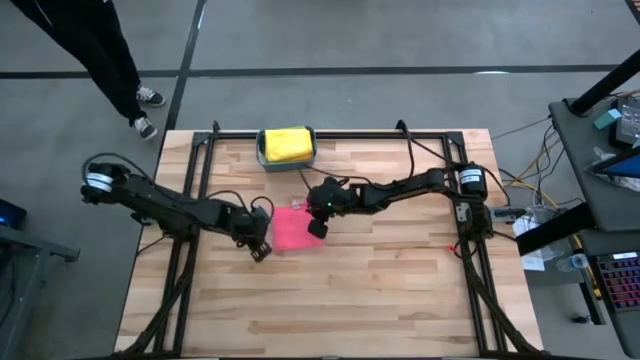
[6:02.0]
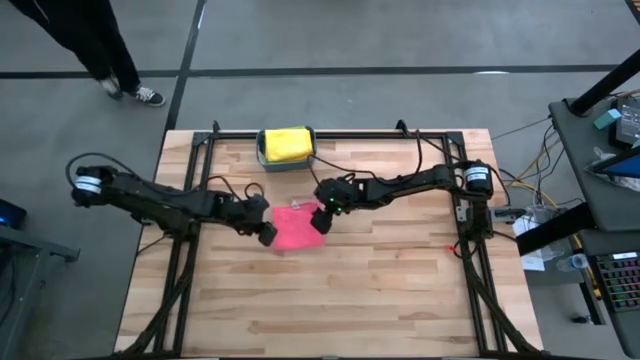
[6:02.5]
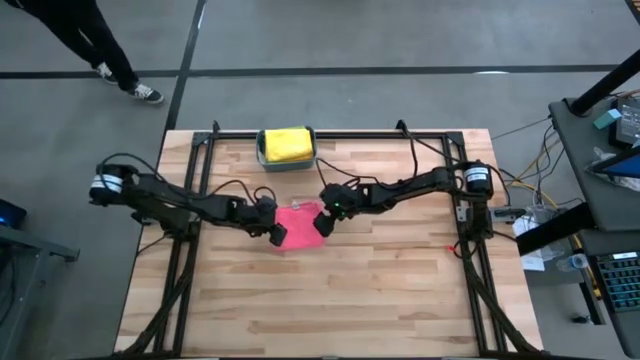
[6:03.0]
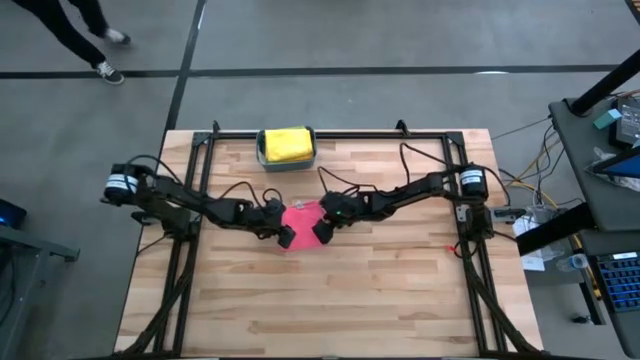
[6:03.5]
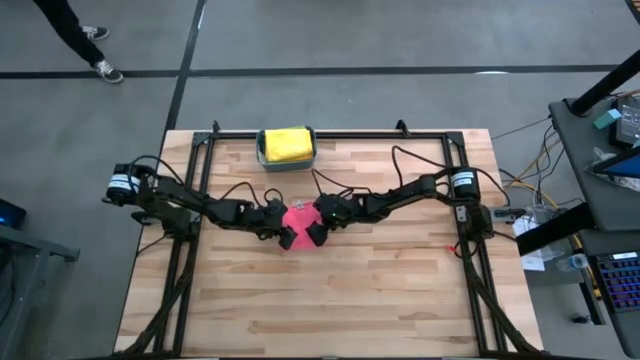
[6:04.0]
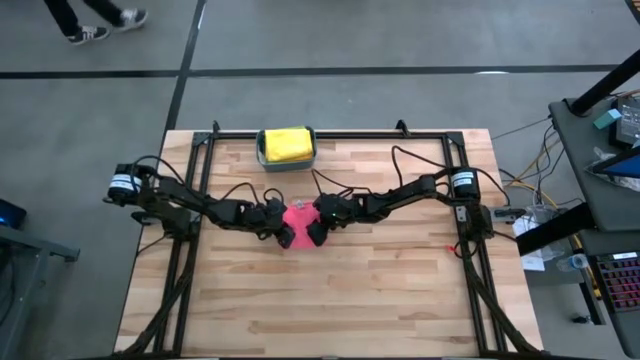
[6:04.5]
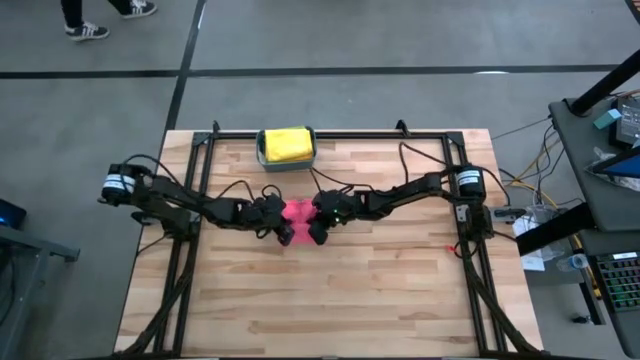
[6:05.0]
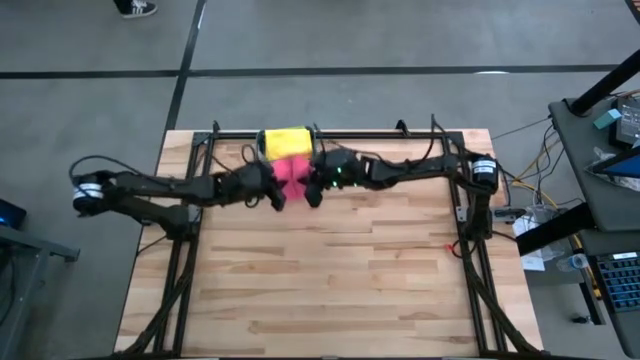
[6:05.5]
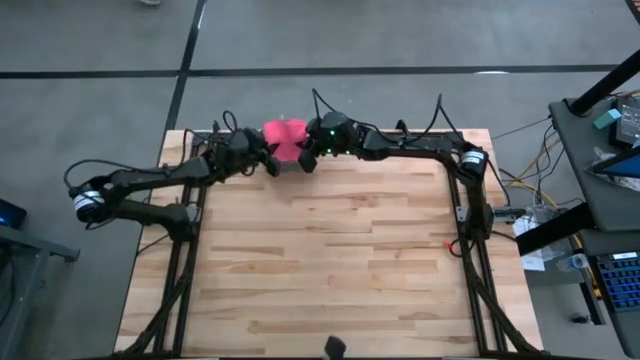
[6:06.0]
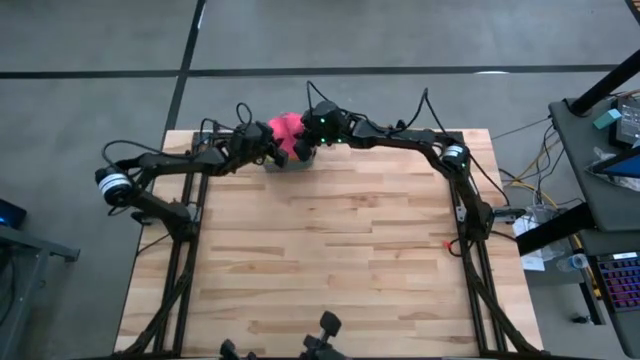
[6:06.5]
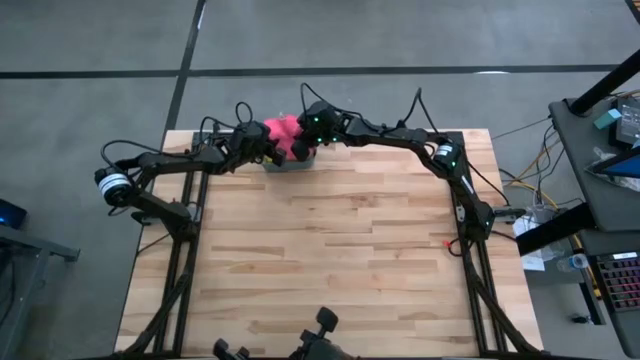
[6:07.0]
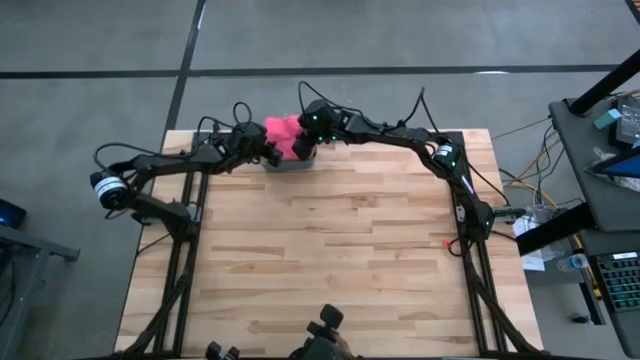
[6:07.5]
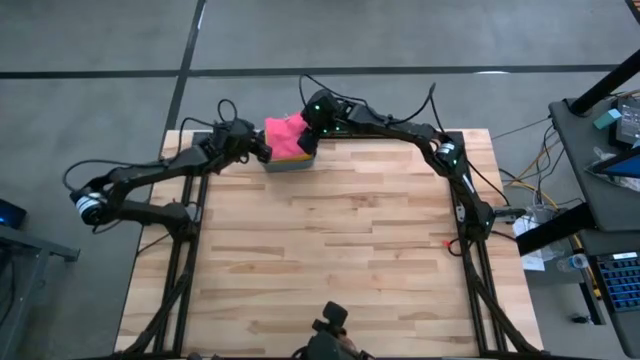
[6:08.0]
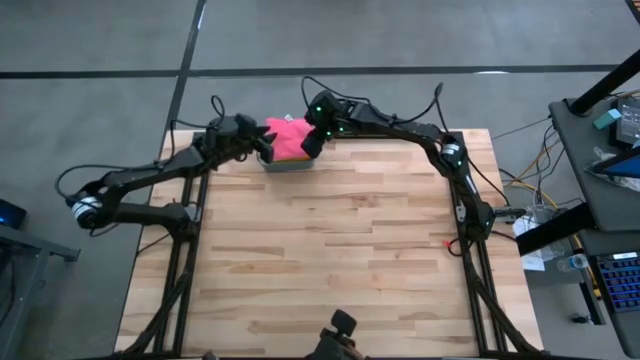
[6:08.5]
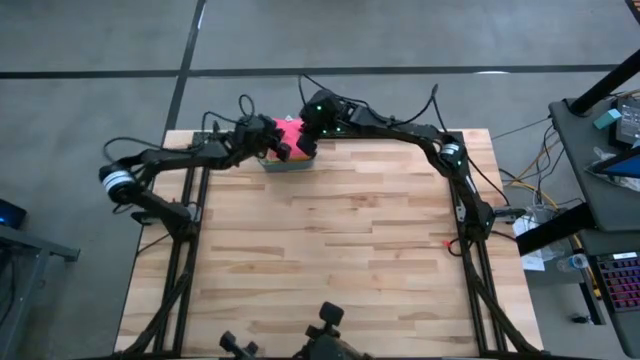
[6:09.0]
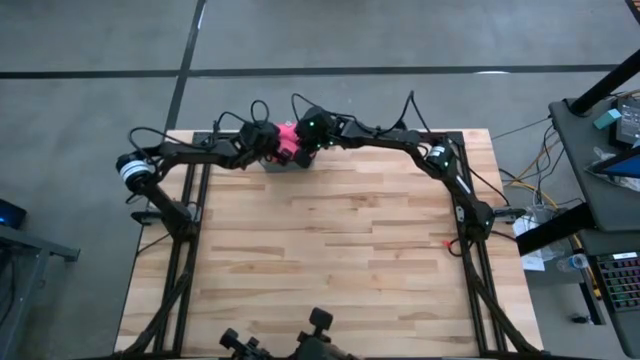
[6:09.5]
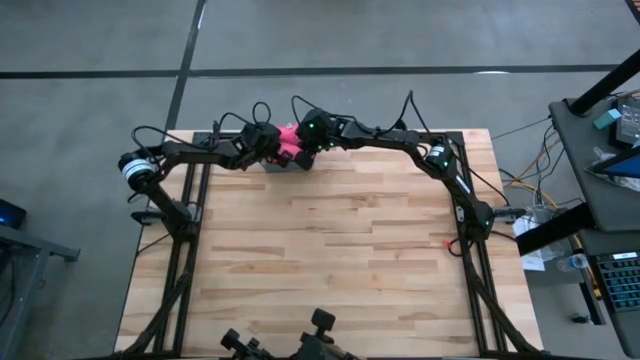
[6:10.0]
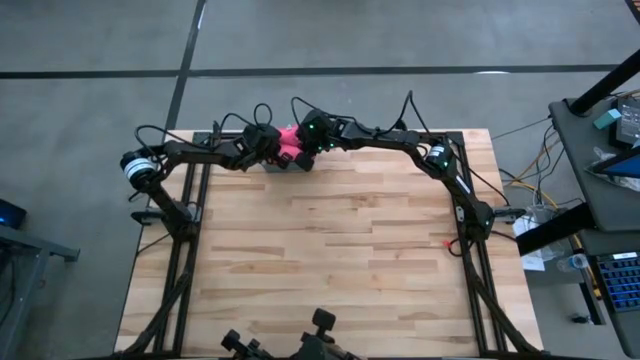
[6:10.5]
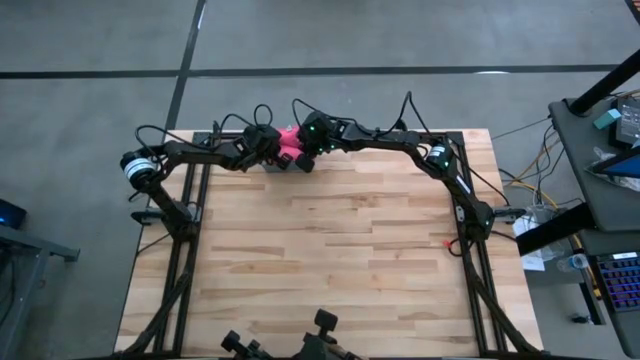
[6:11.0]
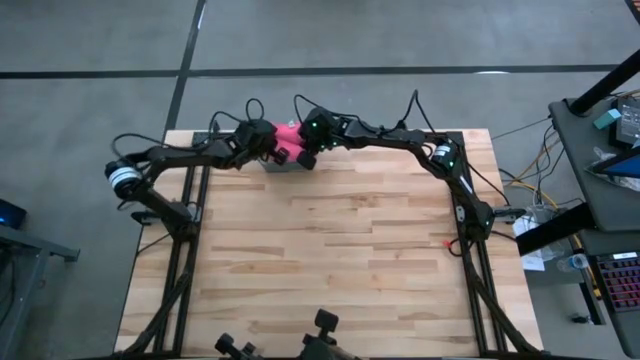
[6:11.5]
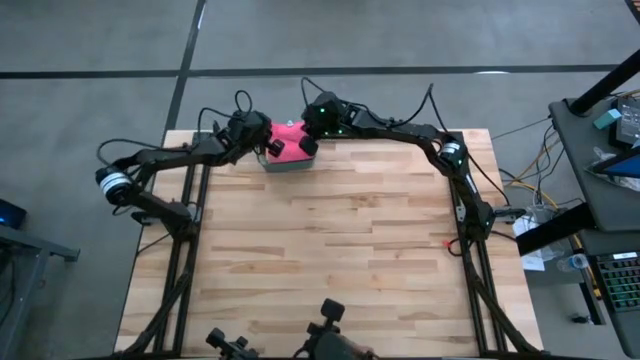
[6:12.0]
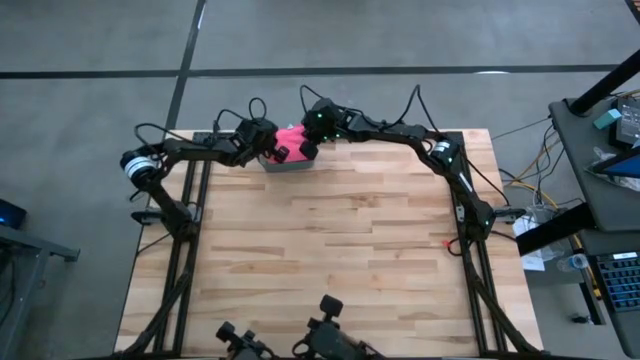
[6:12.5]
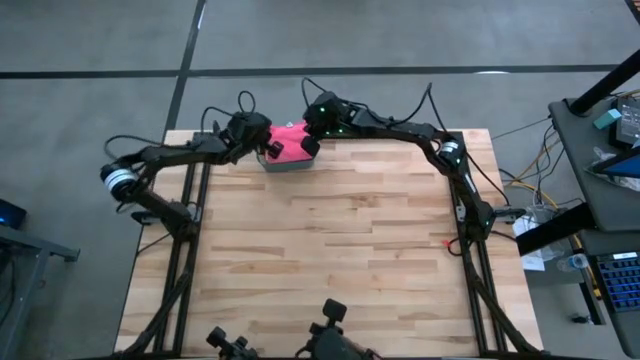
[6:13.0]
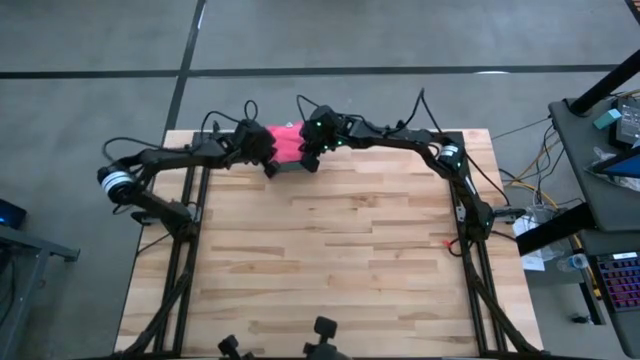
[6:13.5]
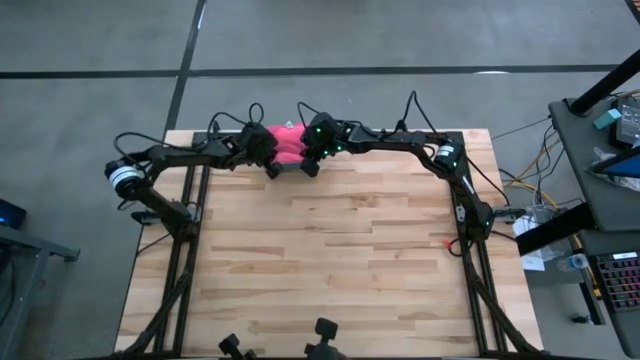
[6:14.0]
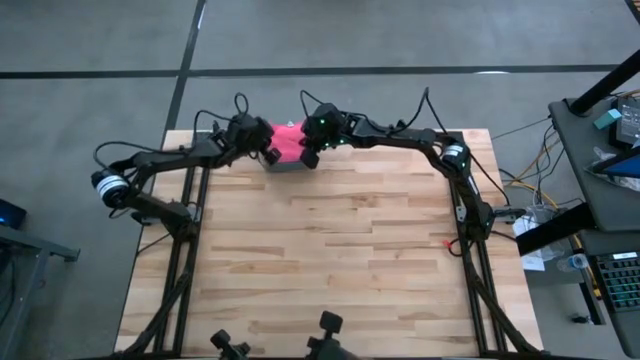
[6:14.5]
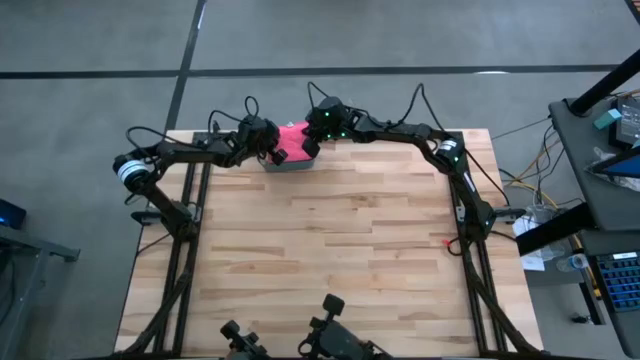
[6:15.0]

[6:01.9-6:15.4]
Task: Fold microfiber towels
Put the pink towel into the bin

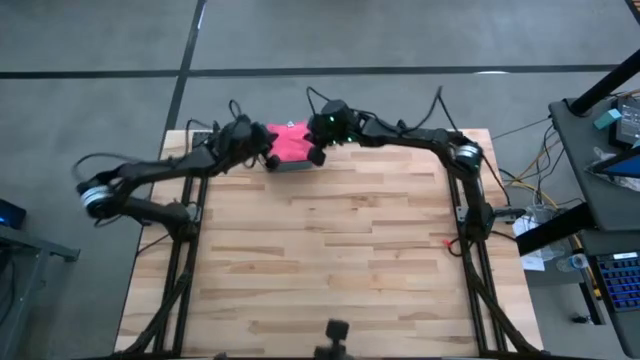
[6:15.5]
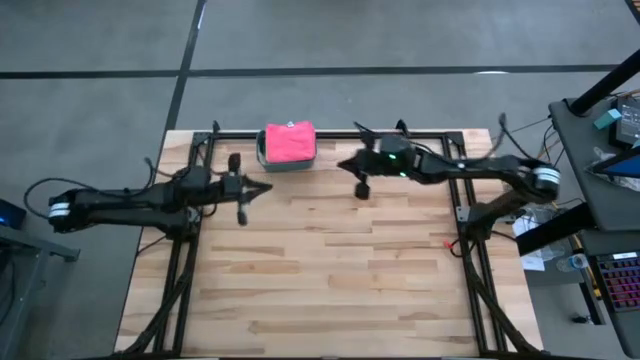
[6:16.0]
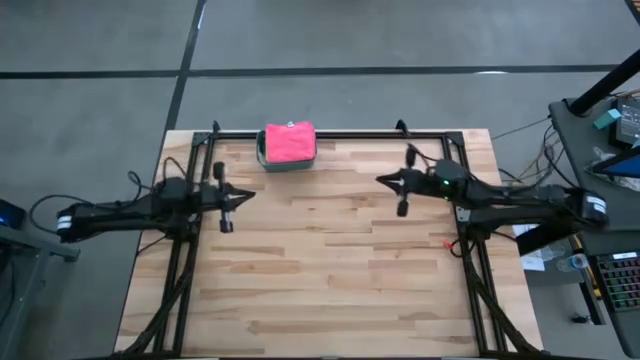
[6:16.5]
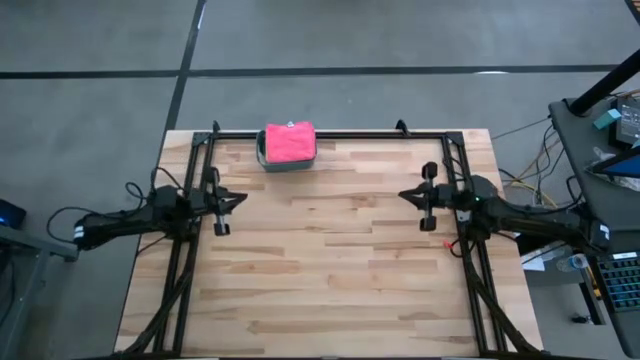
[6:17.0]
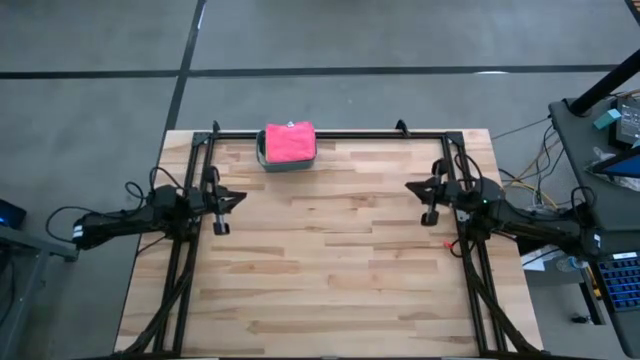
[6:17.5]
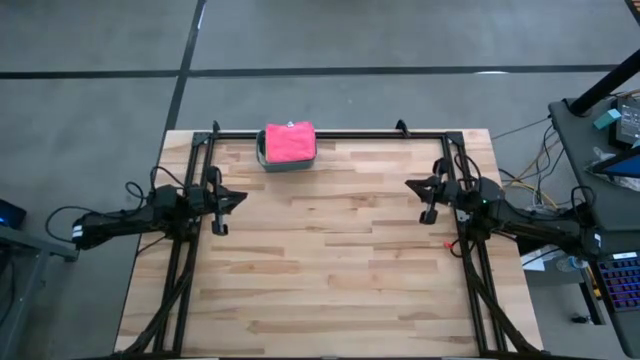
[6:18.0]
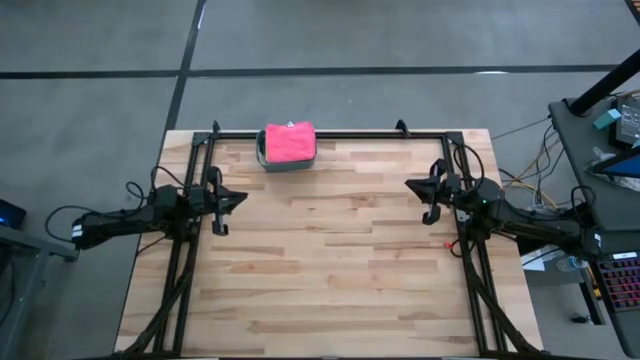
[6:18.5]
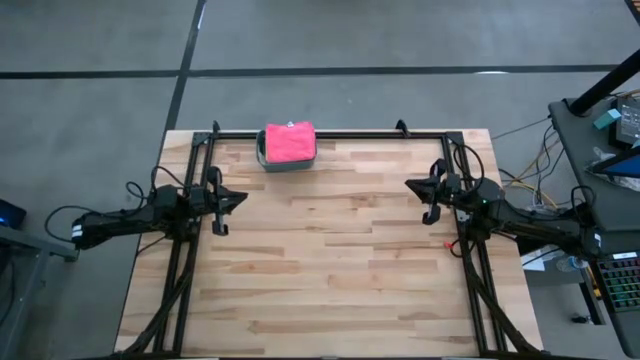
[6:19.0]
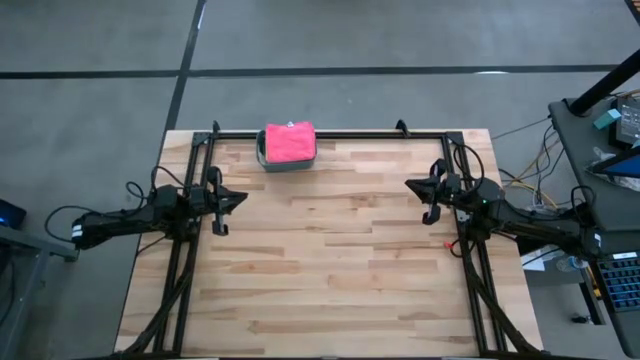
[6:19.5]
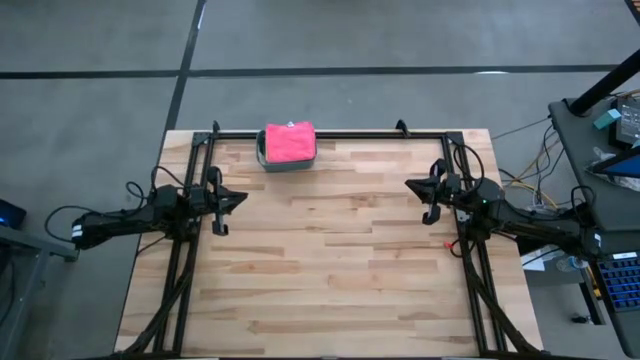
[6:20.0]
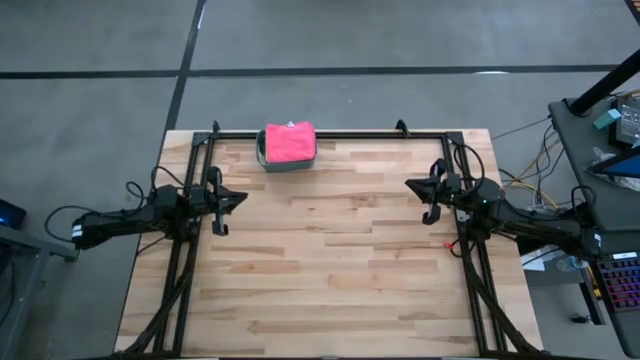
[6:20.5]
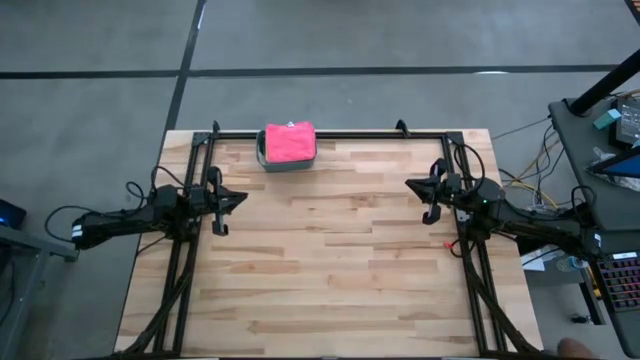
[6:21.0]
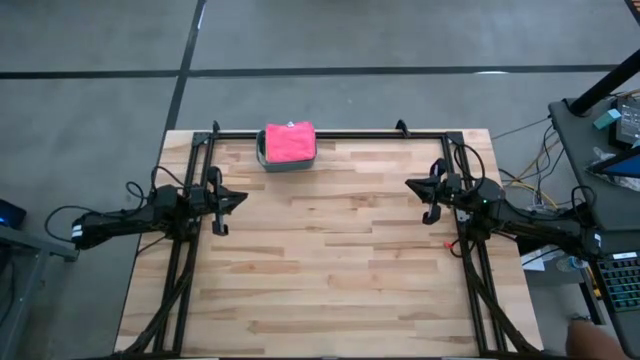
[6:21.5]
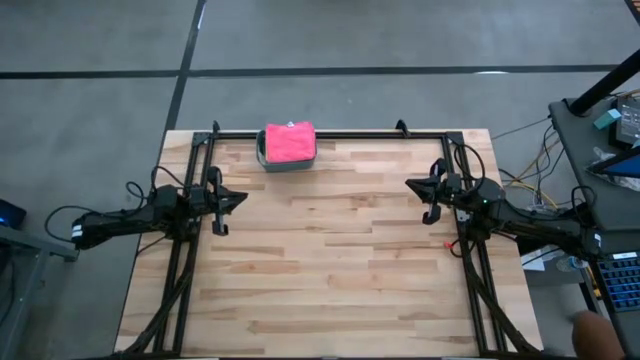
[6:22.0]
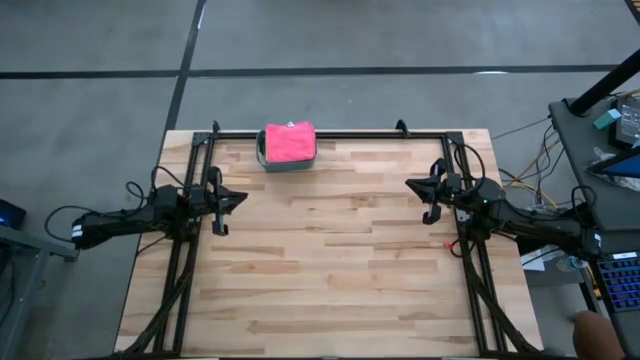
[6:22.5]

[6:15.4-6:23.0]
Return to Home Position
